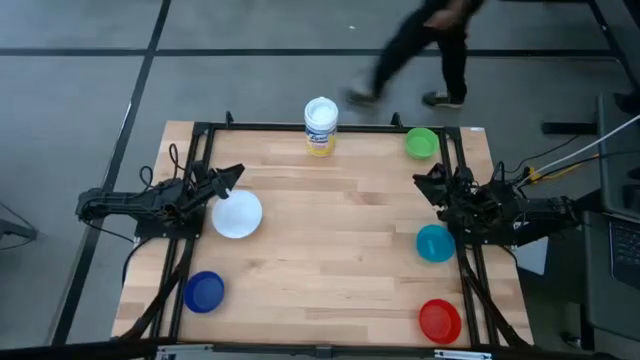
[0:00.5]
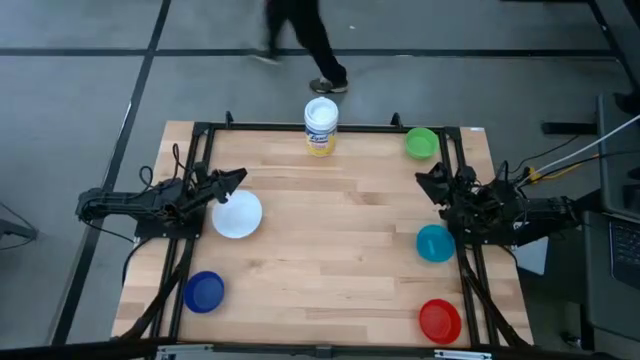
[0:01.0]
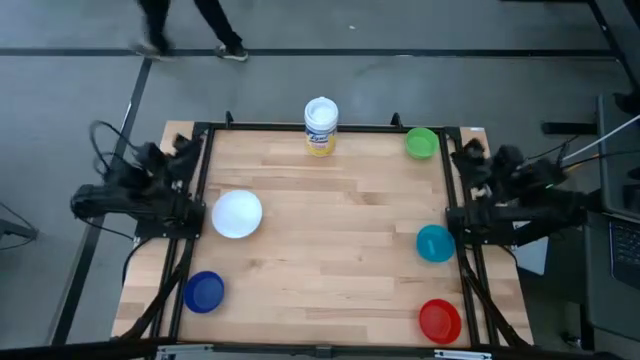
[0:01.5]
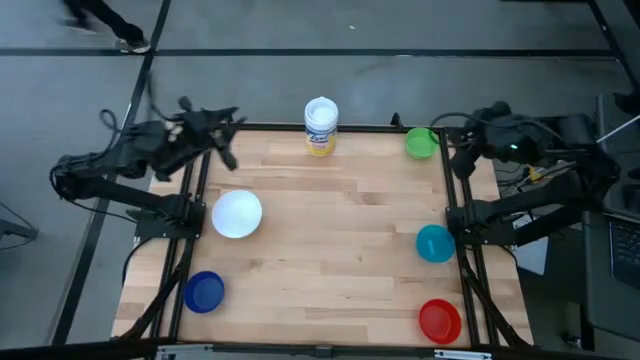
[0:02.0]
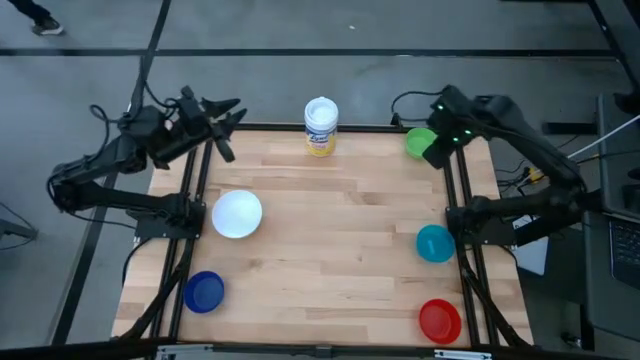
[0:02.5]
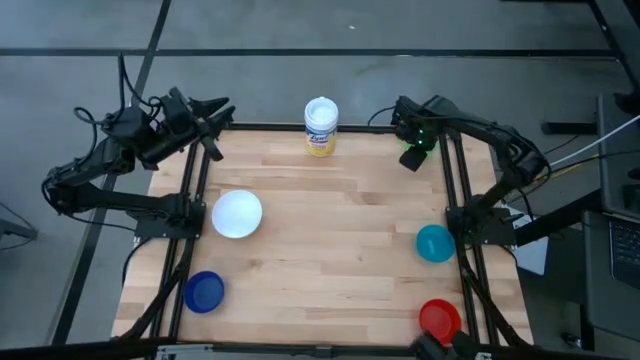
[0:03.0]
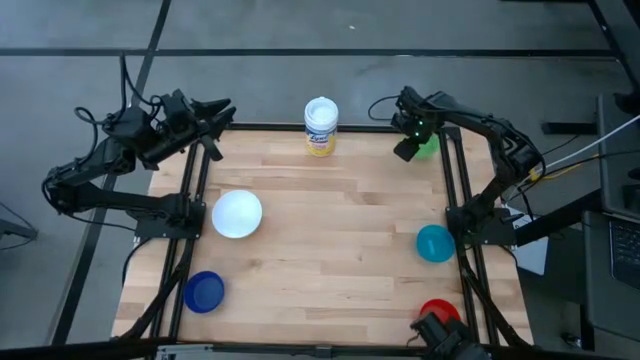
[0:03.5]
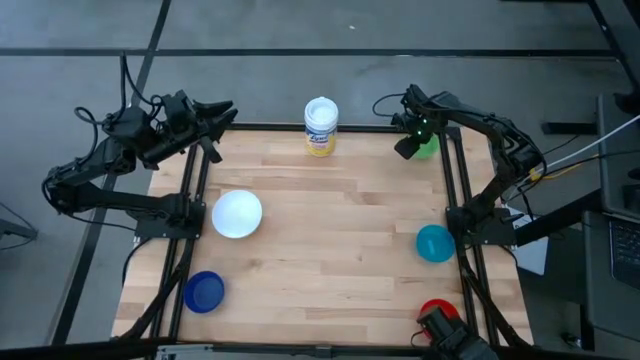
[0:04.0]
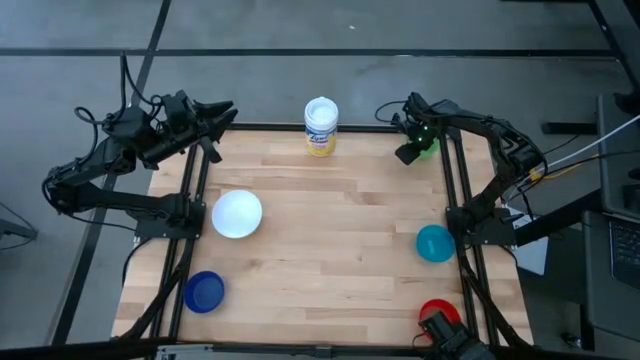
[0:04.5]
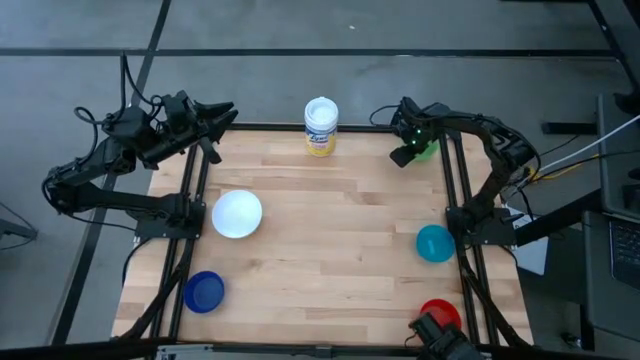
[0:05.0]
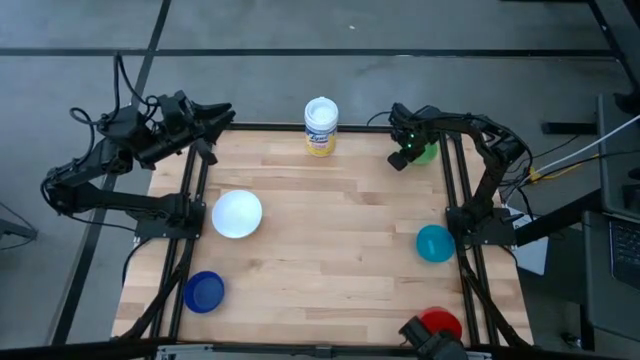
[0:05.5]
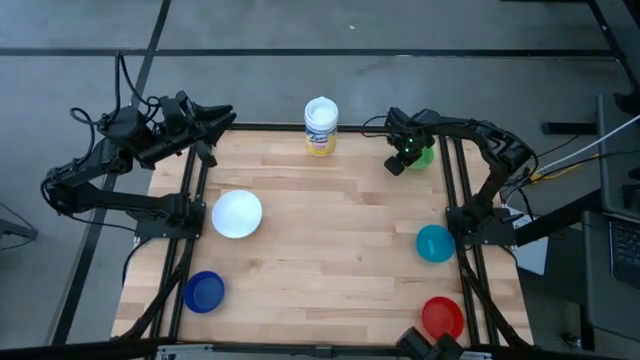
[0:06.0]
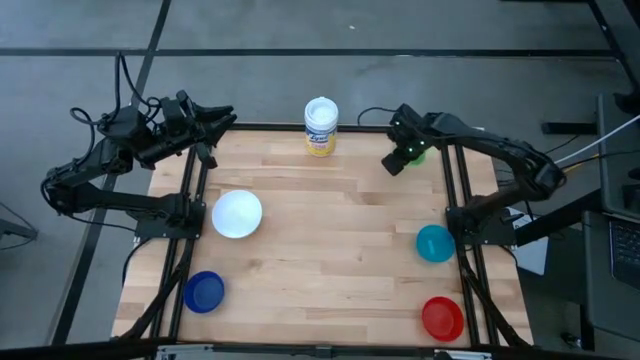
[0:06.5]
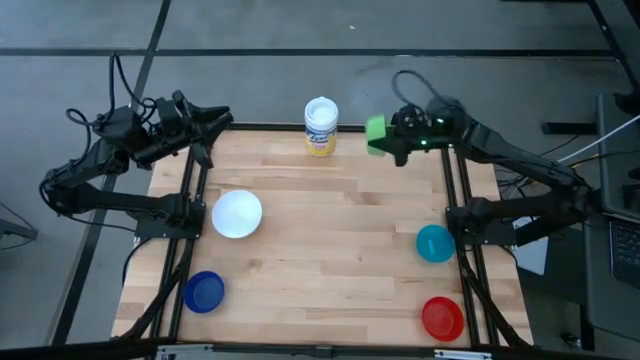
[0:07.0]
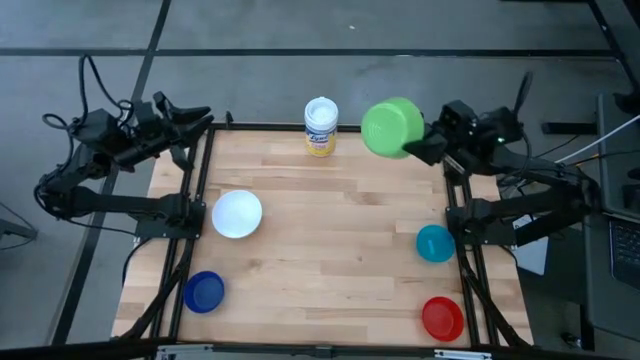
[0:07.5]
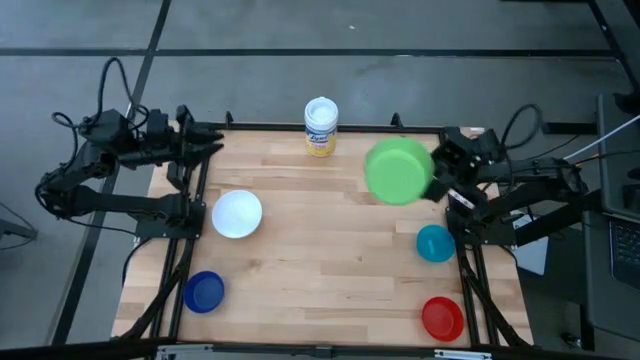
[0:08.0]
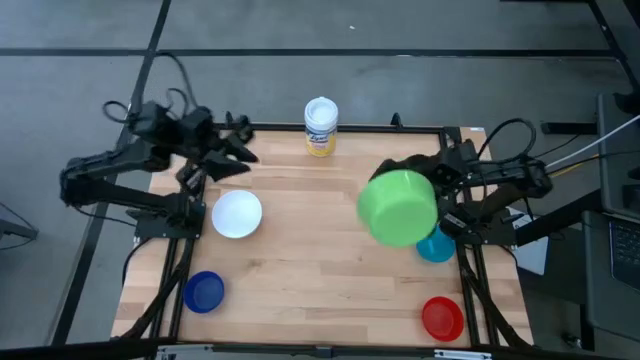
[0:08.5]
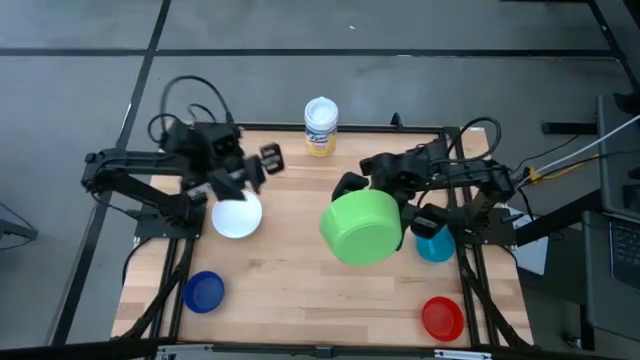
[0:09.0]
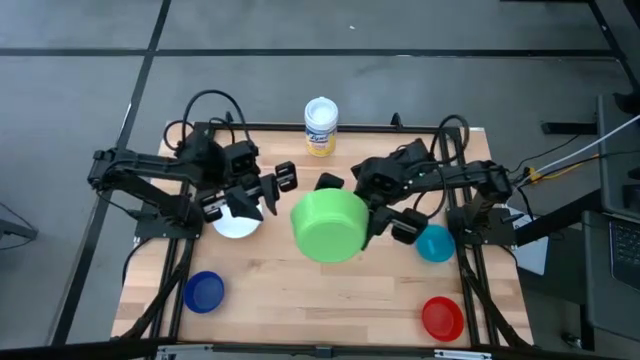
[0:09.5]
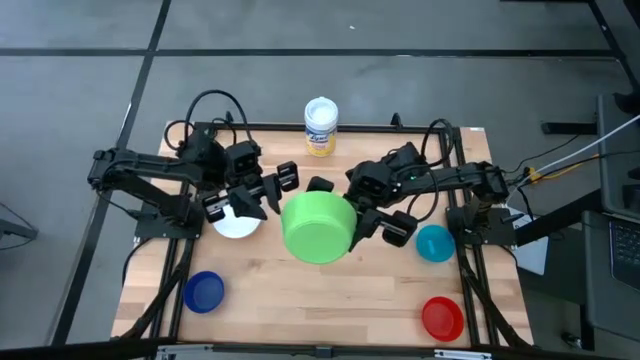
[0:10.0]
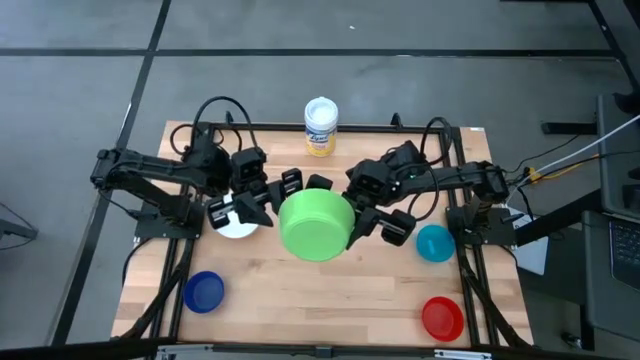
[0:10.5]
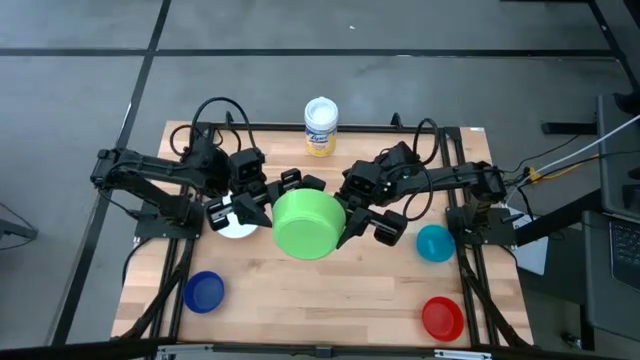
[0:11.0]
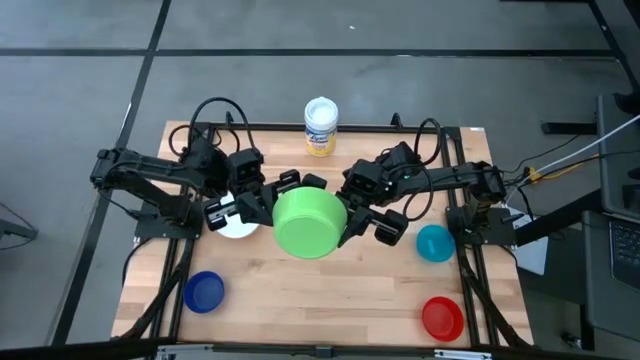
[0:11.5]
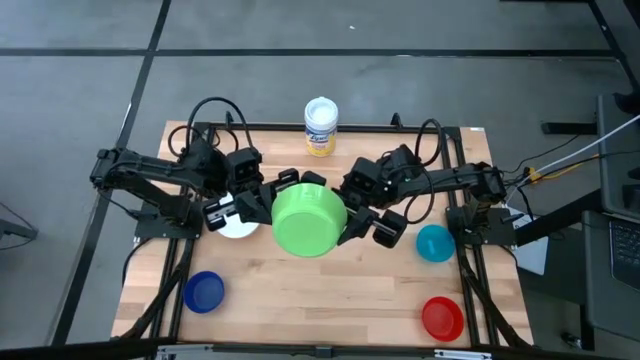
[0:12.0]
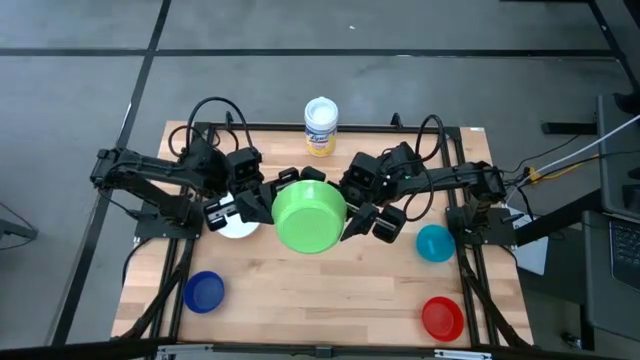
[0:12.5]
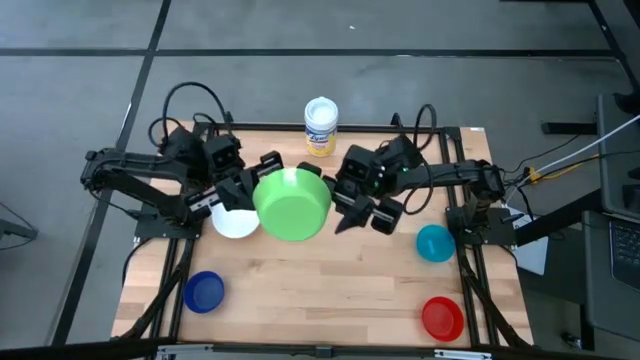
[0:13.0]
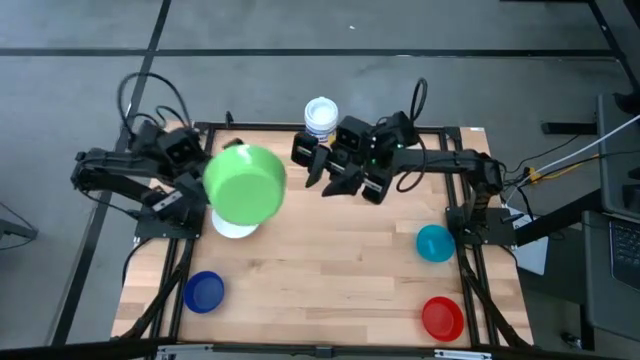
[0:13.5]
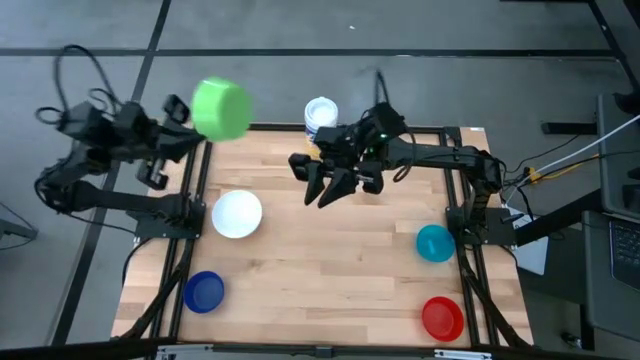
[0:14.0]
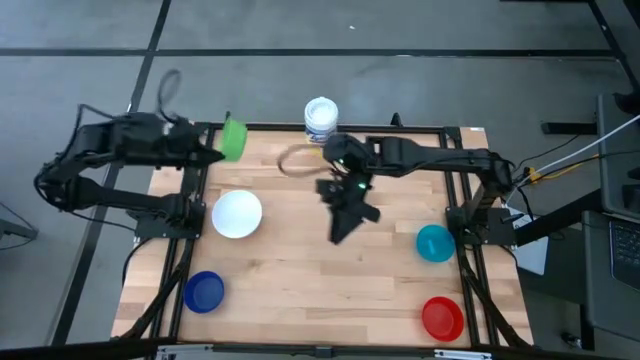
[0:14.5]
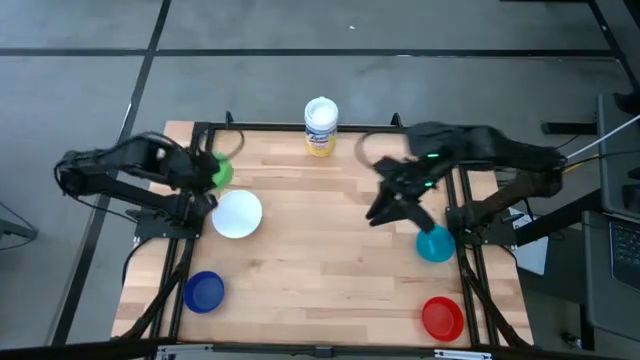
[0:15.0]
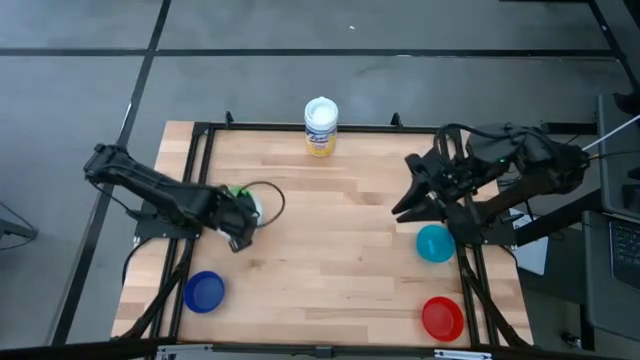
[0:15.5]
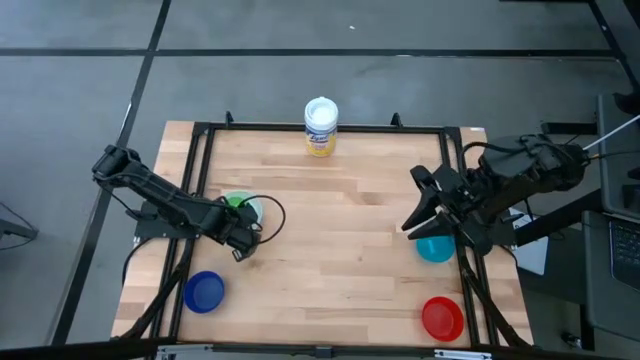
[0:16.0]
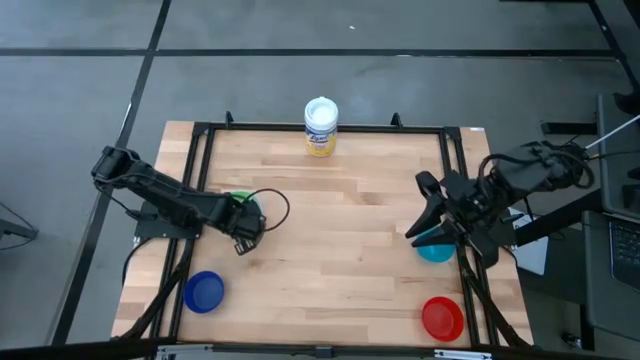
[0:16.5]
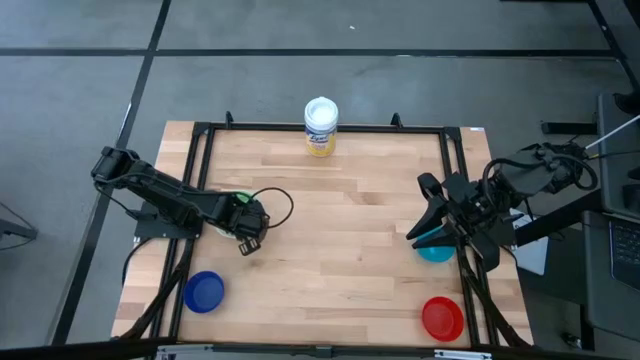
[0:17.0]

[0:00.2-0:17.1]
Stack the green bowl on the white bowl

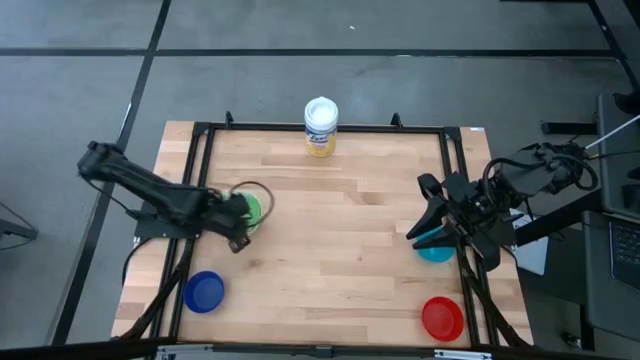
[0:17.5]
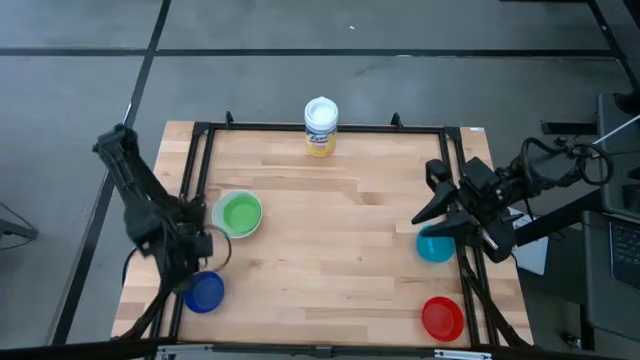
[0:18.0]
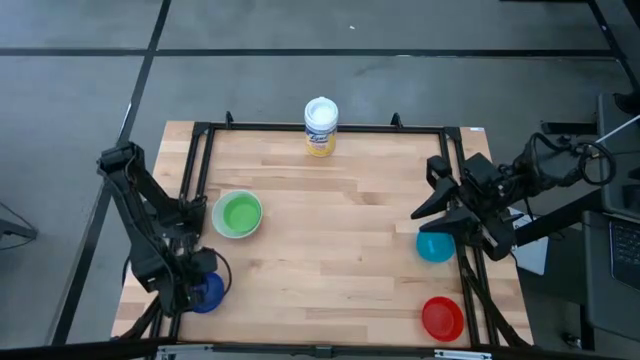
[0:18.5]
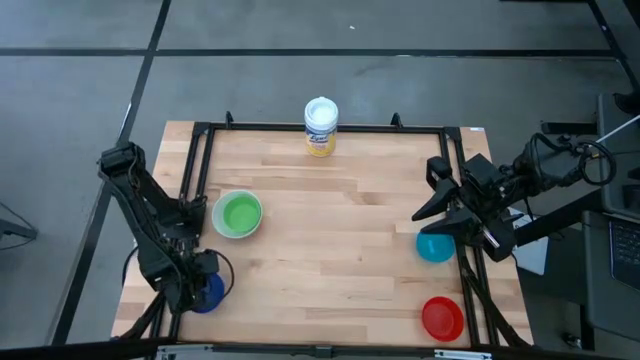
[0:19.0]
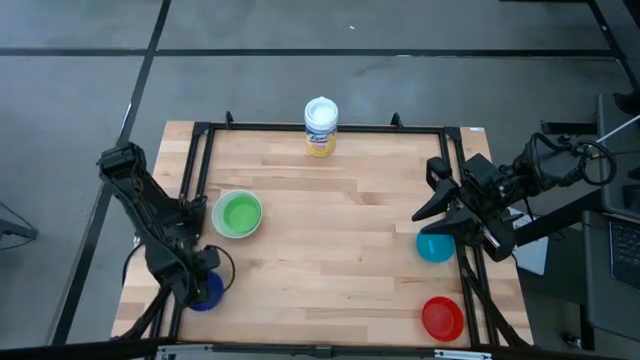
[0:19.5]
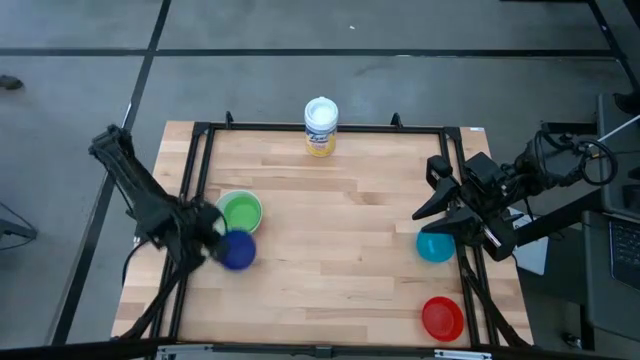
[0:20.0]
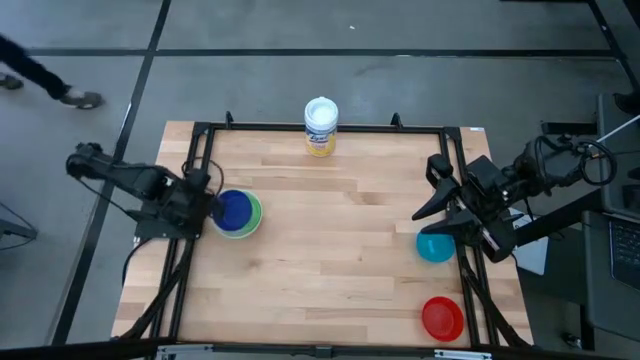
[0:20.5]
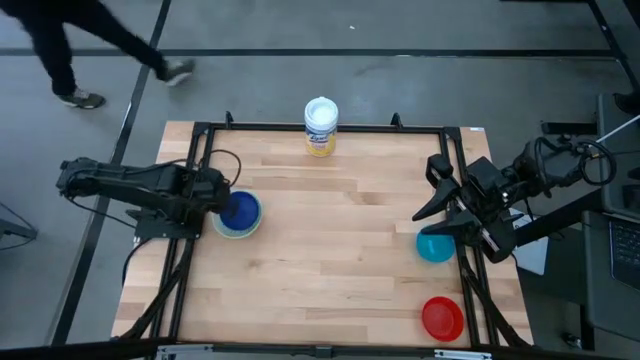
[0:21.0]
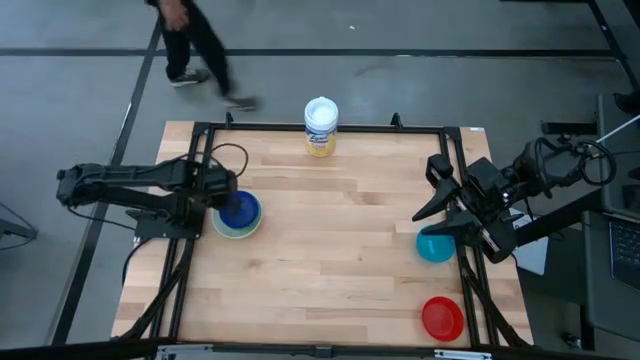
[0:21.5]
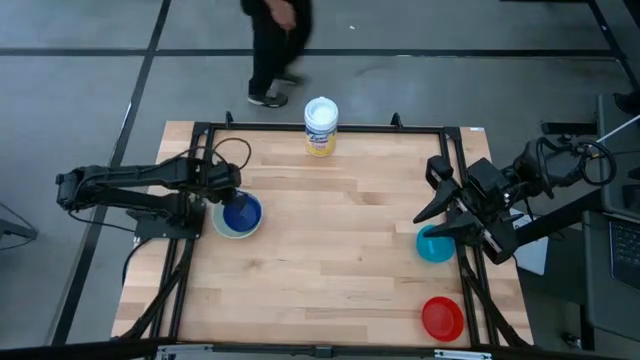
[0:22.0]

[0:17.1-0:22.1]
Stack the blue bowl on top of the blue bowl

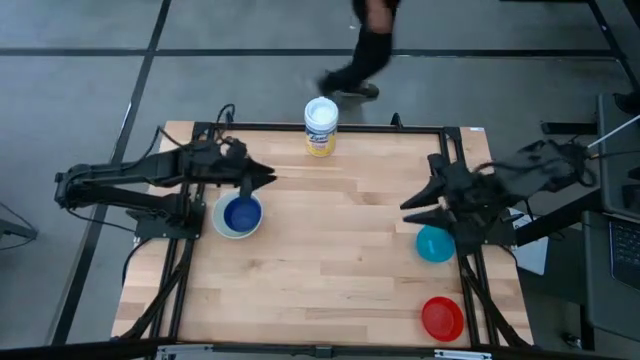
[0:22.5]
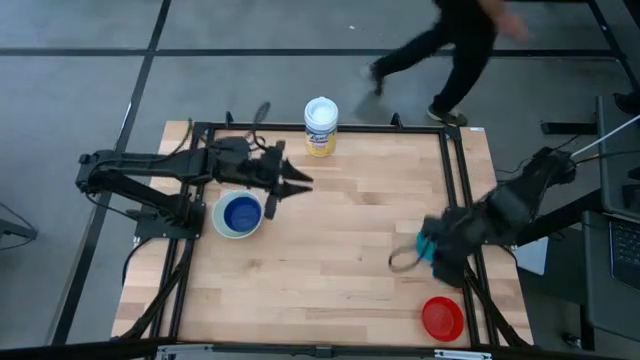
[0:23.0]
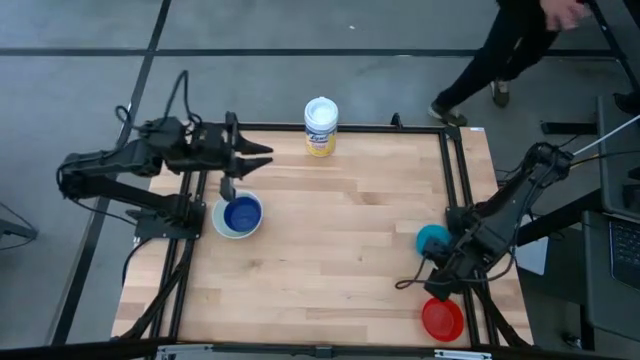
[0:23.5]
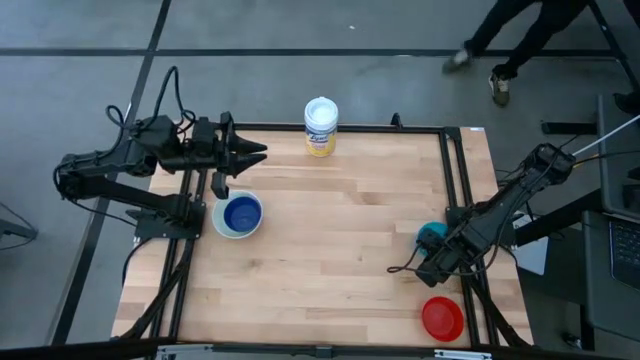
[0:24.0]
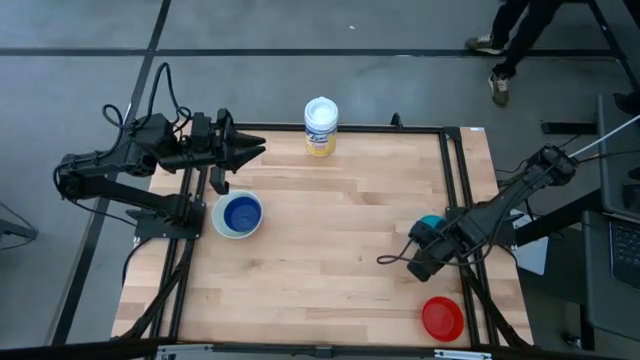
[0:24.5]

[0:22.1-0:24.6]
Stack the light blue bowl on top of the blue bowl
